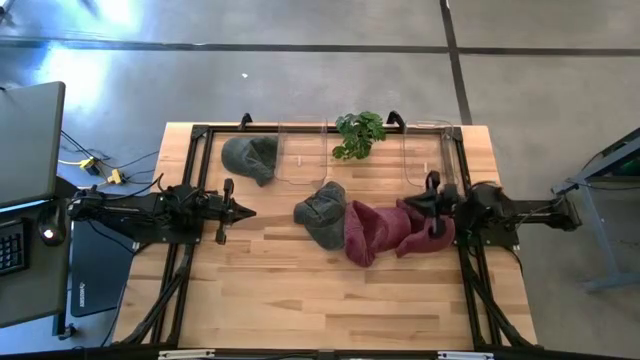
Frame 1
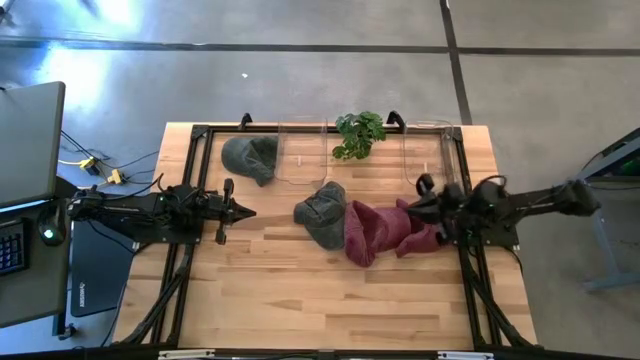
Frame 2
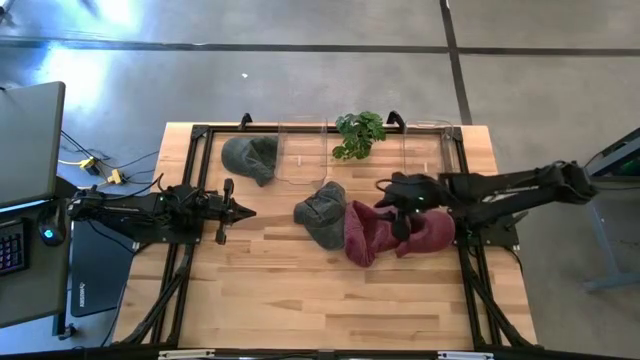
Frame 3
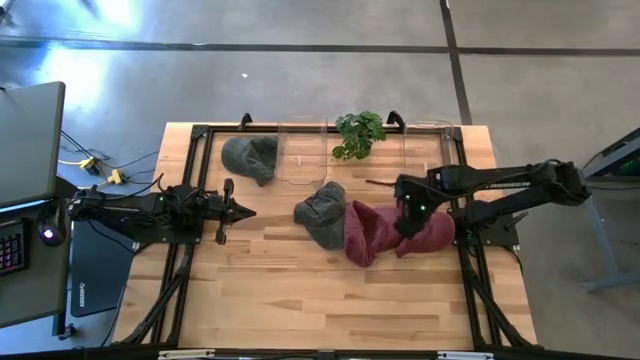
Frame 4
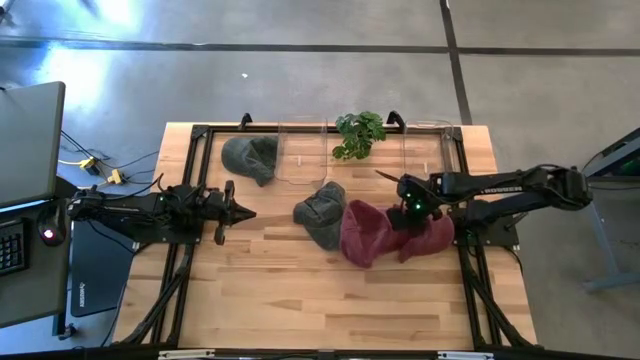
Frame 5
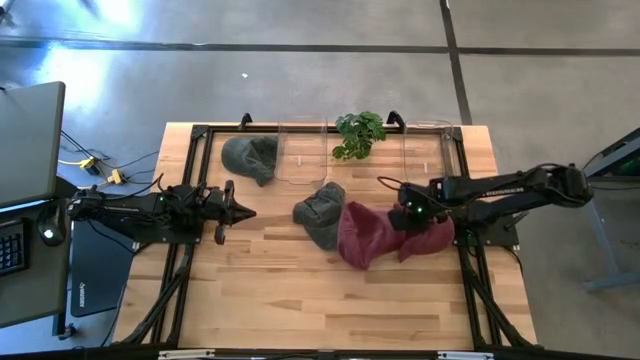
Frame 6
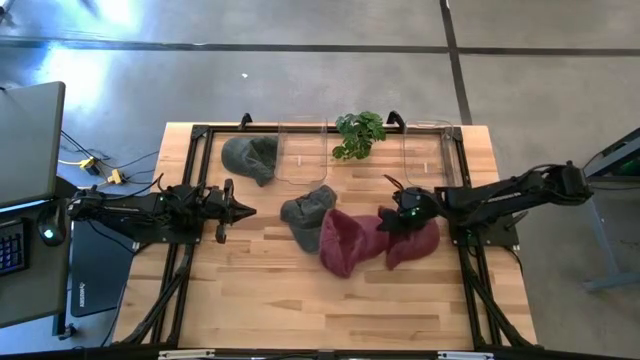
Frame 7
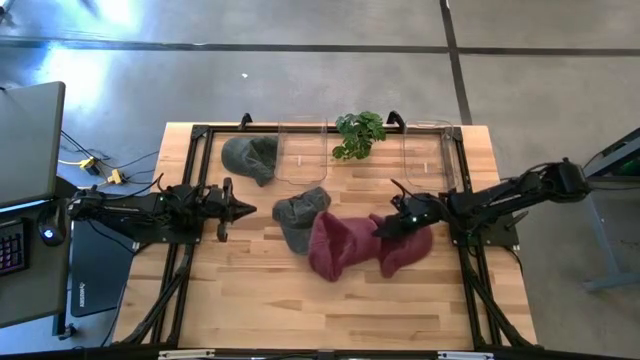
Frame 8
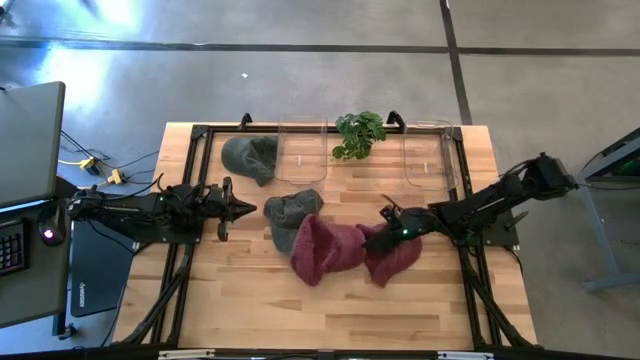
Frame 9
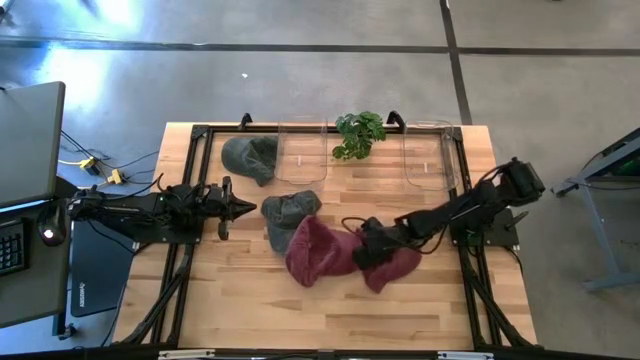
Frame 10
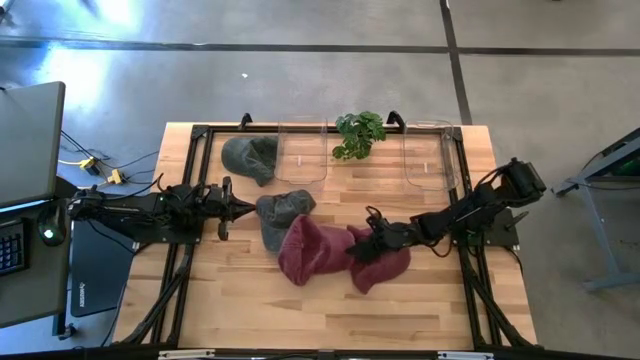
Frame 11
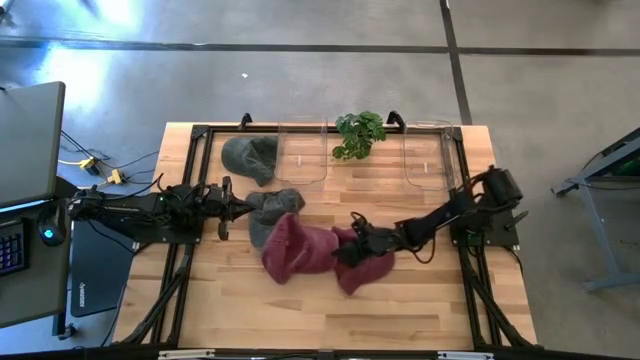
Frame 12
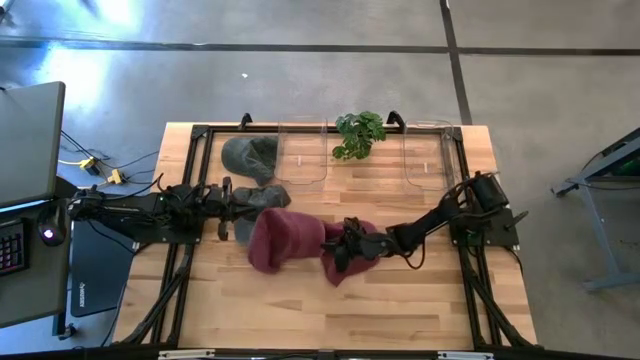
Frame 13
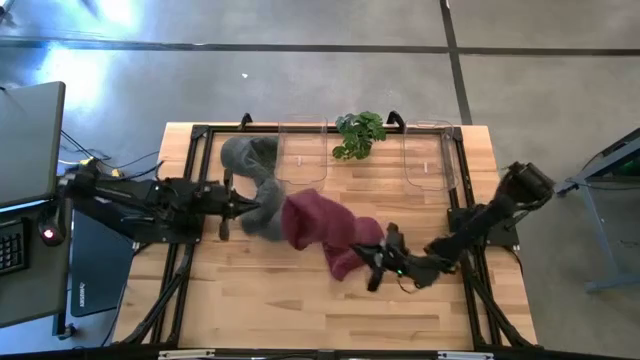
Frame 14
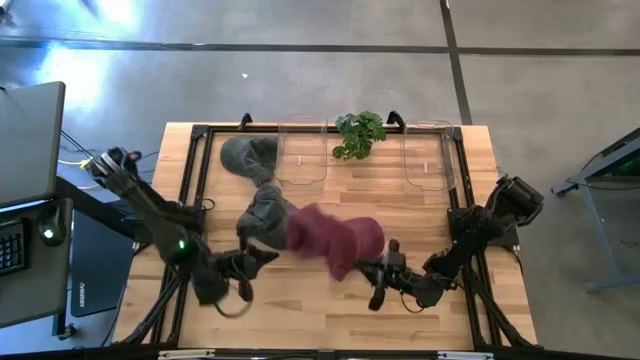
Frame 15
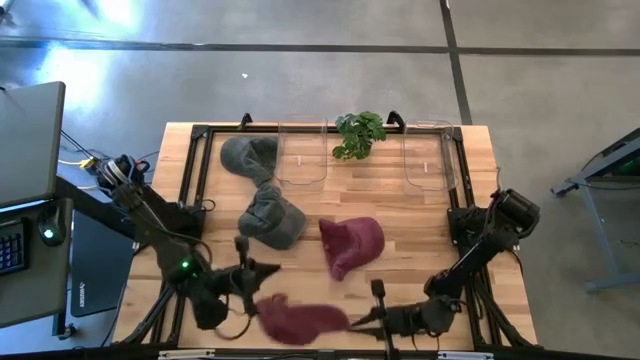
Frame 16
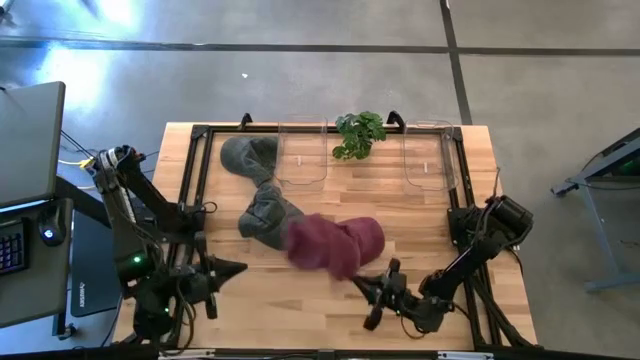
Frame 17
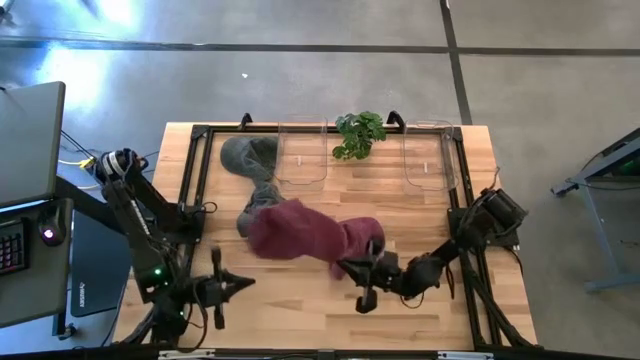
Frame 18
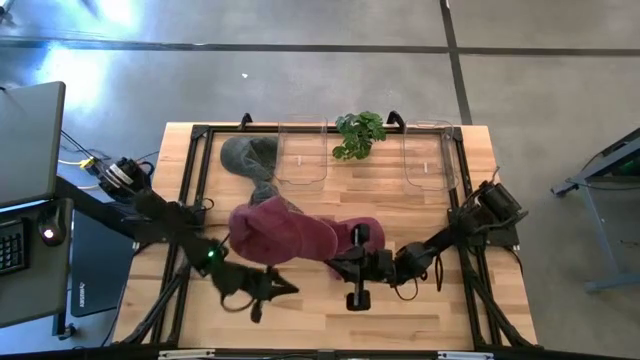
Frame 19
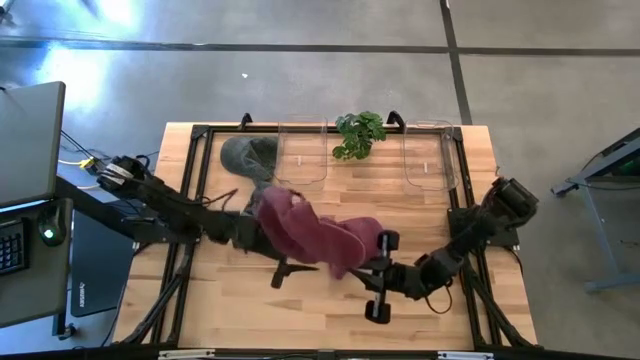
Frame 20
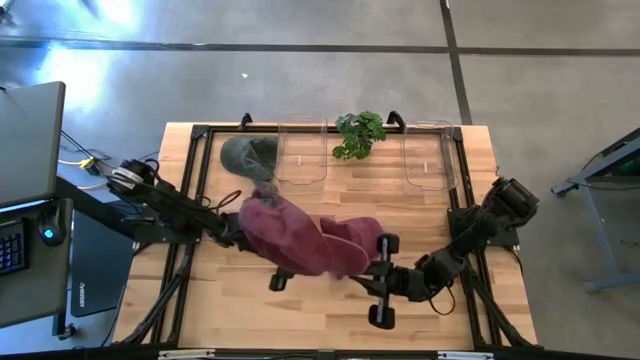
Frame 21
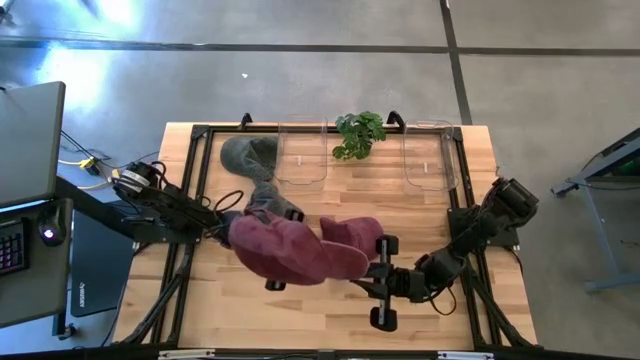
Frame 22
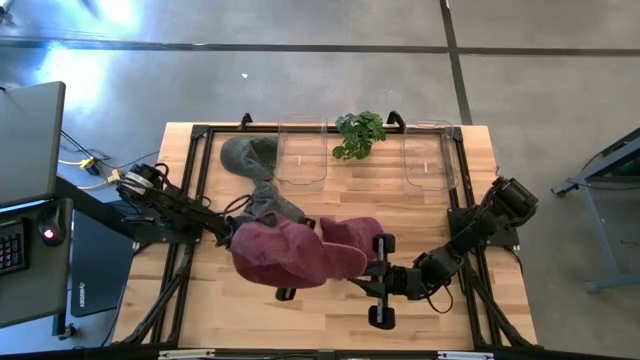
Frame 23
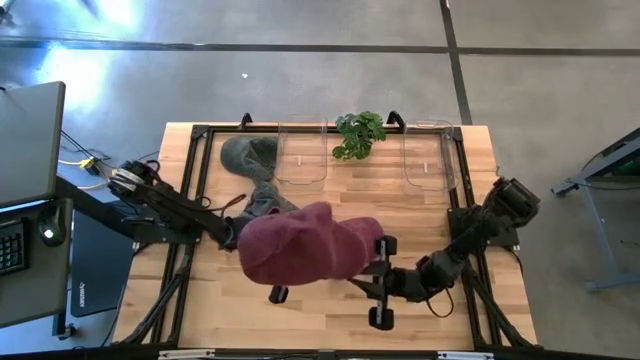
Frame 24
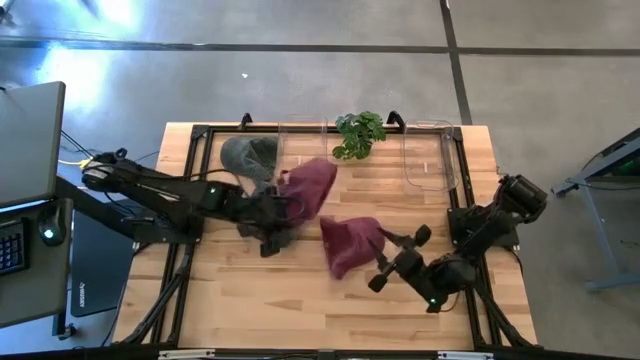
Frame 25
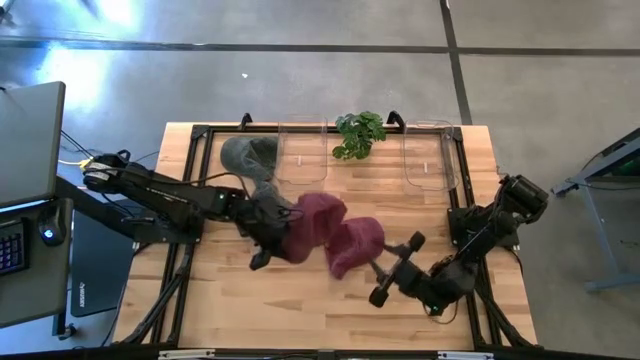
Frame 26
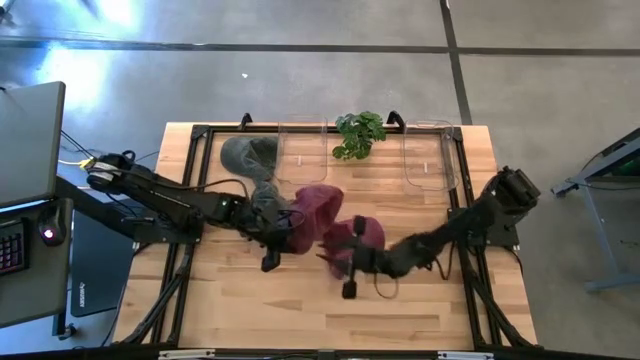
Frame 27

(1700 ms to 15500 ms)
Task: Pick & Place hat
Put the left red cap into the left transparent bin

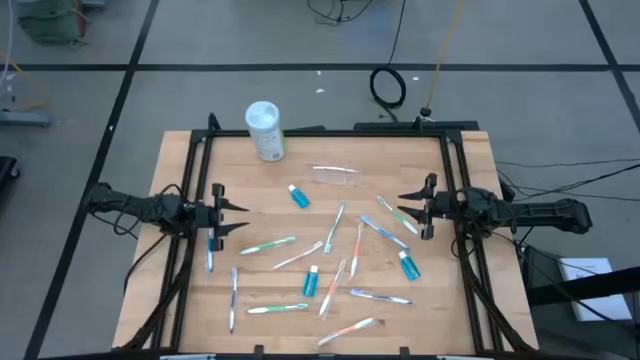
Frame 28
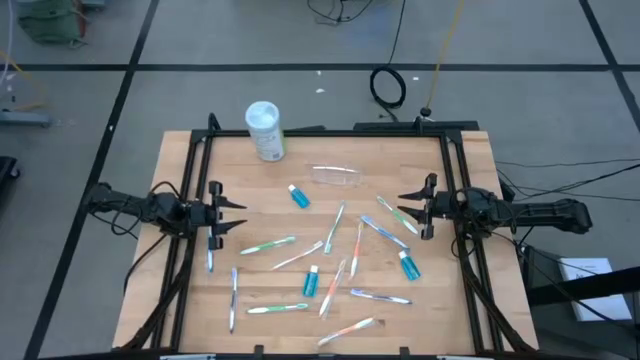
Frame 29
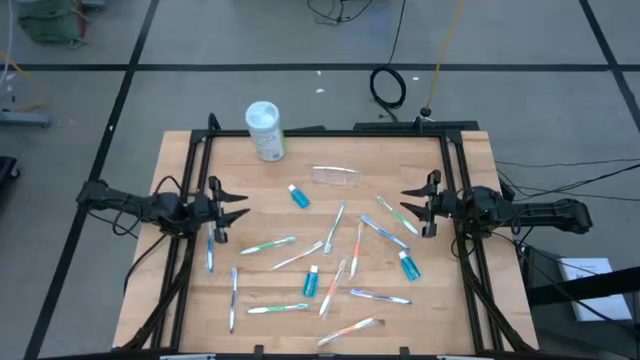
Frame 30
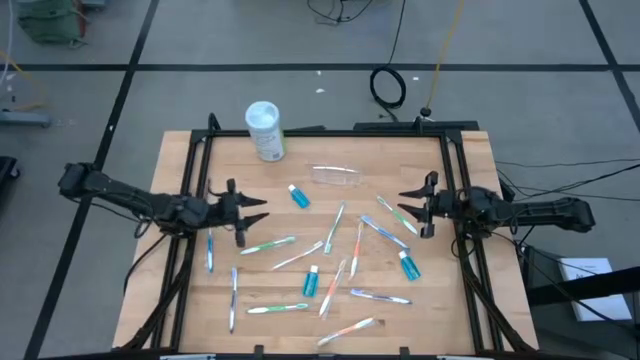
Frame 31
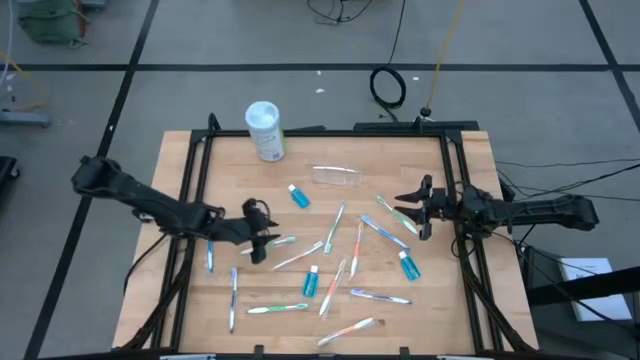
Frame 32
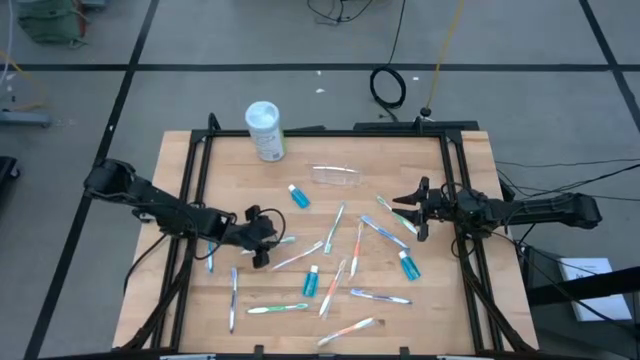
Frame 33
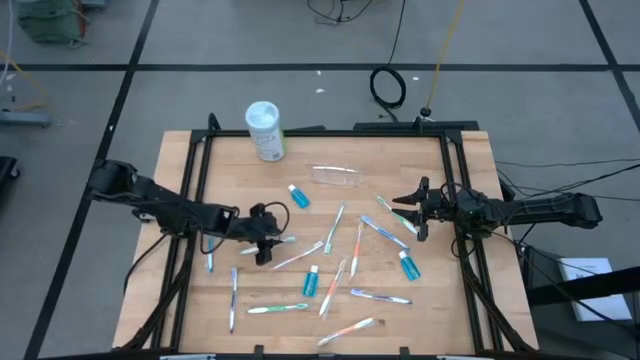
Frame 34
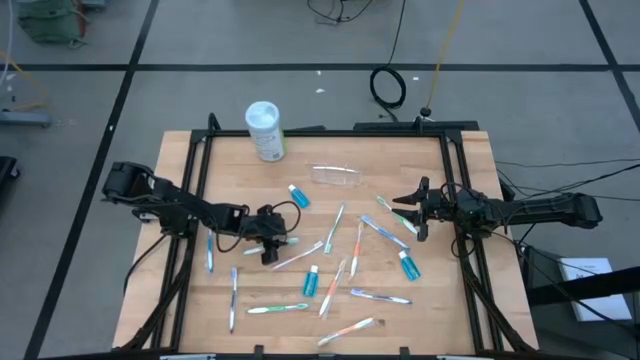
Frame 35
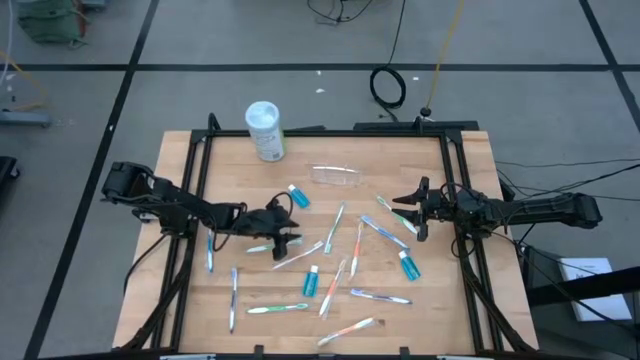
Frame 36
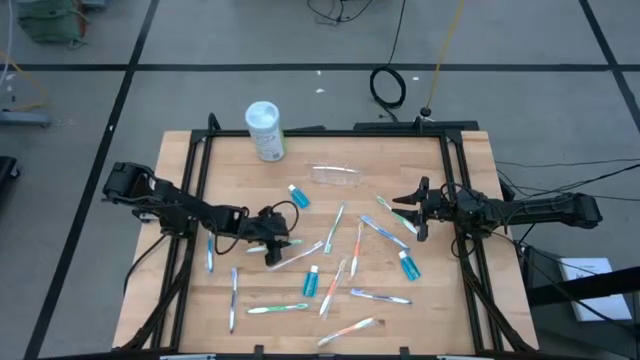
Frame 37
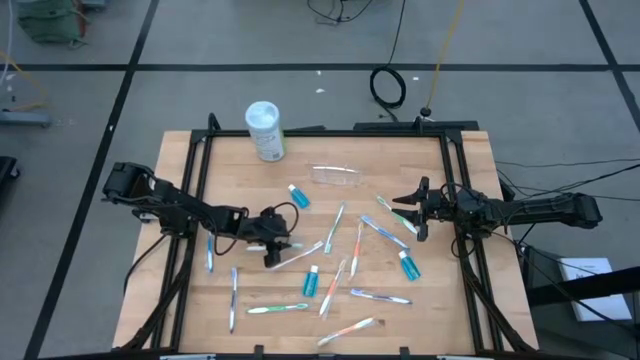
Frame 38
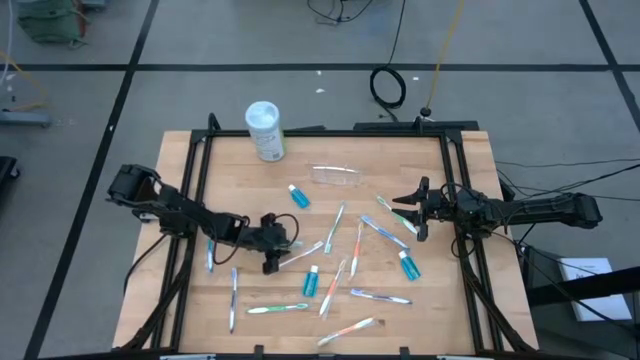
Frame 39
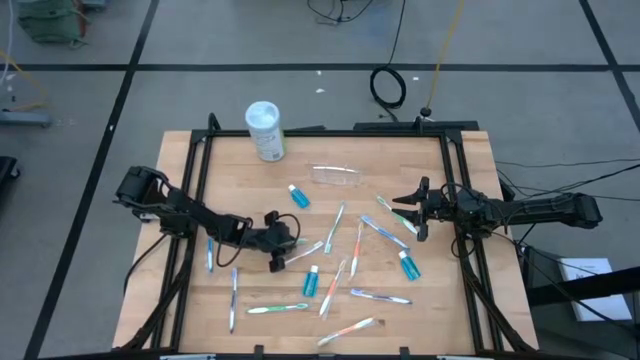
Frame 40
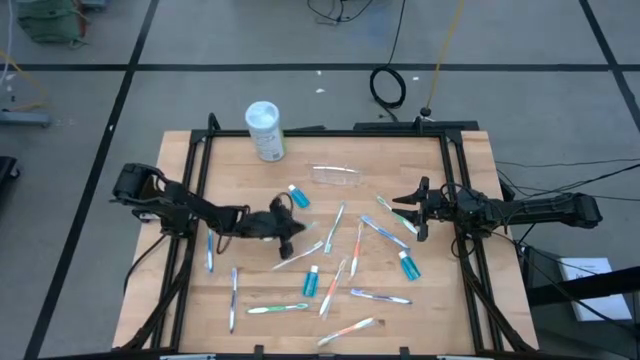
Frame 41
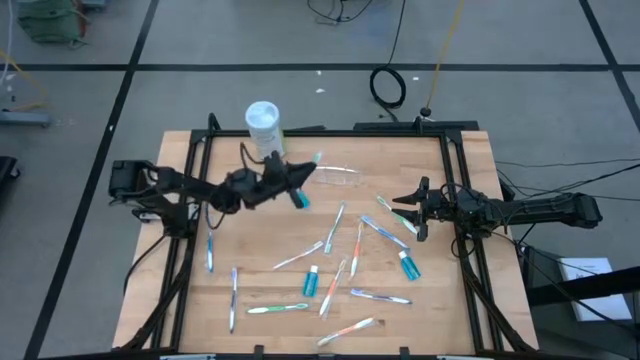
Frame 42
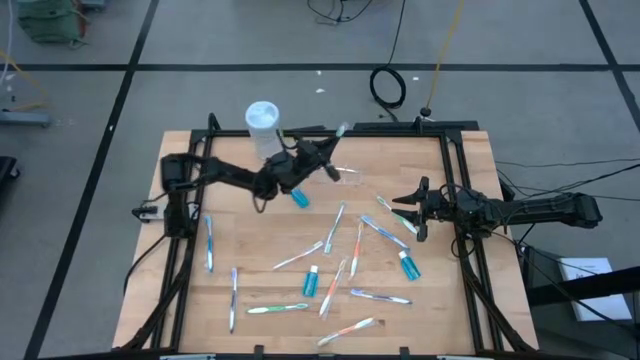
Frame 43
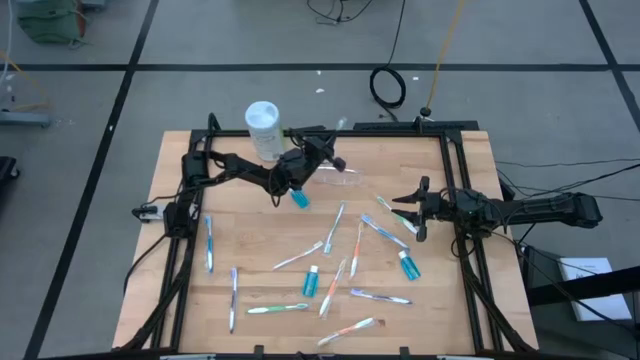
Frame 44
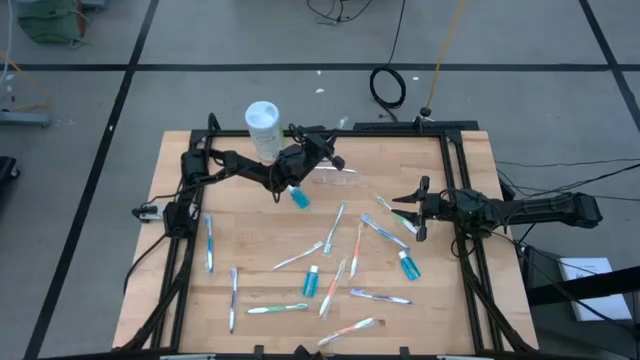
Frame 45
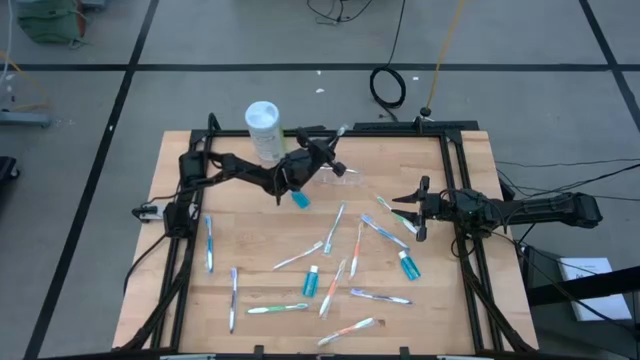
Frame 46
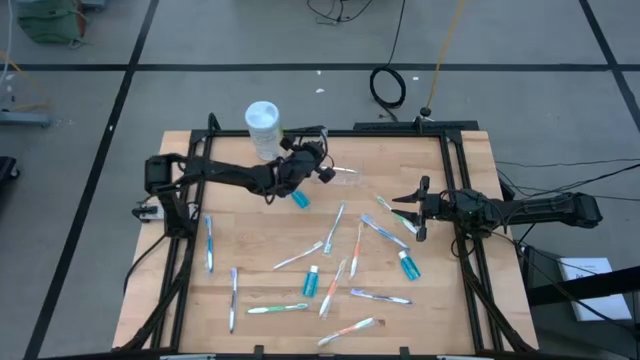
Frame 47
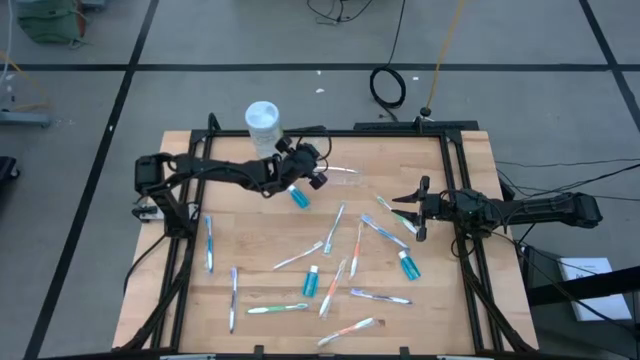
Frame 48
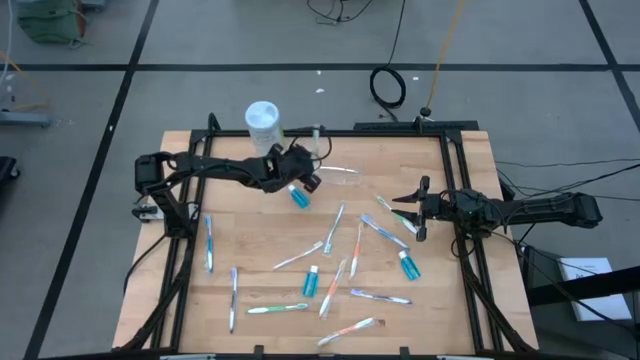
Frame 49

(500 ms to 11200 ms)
Task: Pick & Place toothbrushing station
Put the green toothbrush into the transparent organizer
